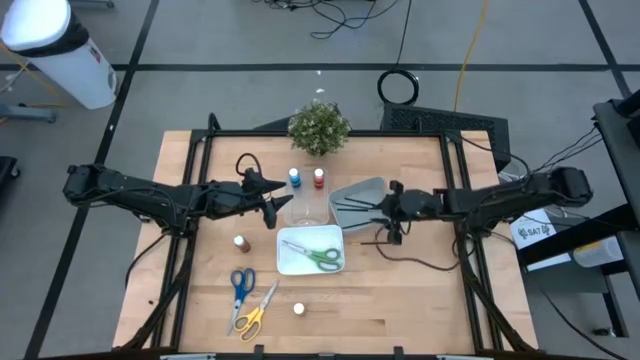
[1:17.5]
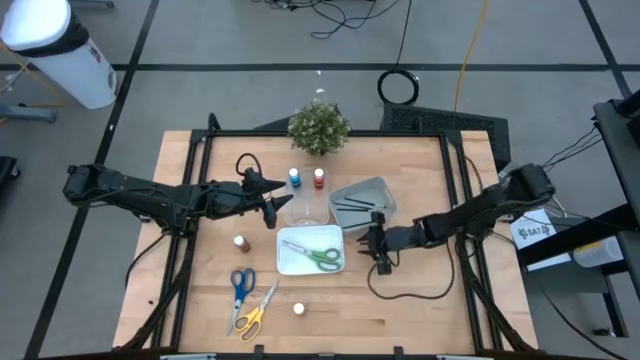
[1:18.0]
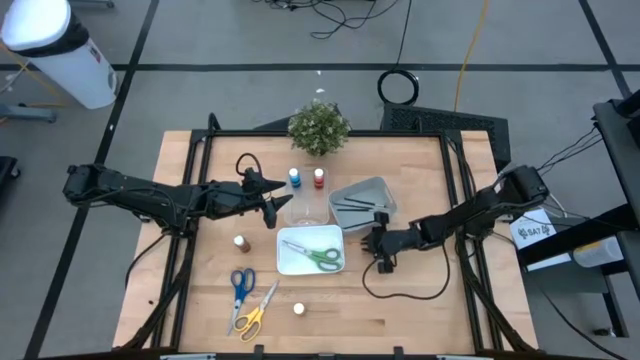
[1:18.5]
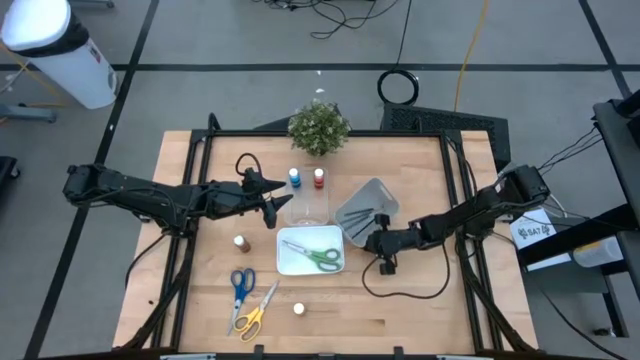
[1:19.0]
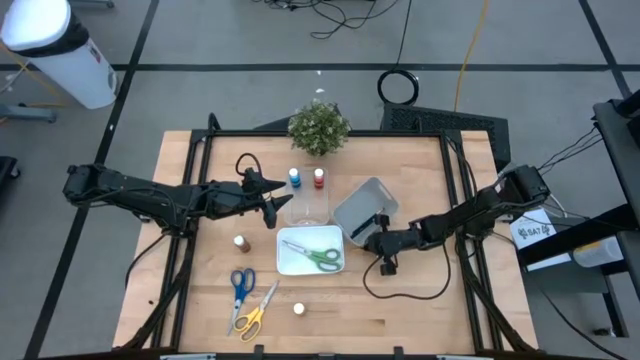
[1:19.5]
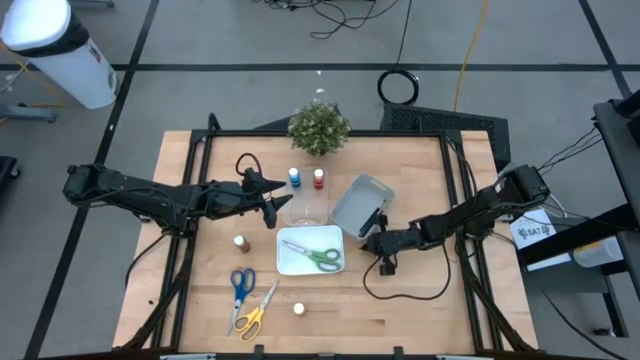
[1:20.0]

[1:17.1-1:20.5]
Task: Pick & Place Paint Supplies
Put the gold paintbrush into the gray bin

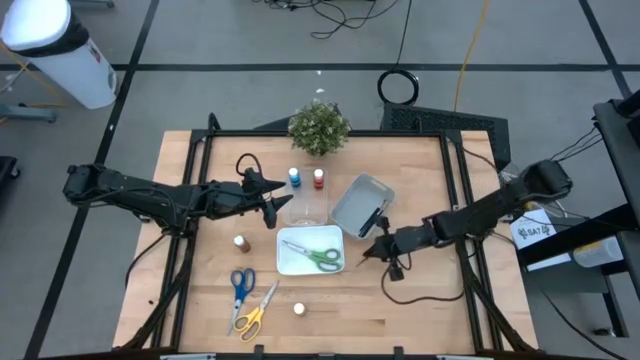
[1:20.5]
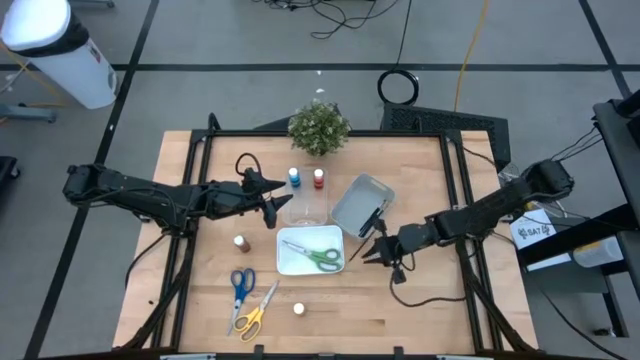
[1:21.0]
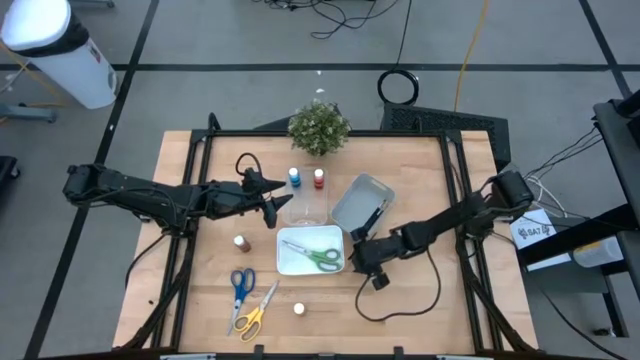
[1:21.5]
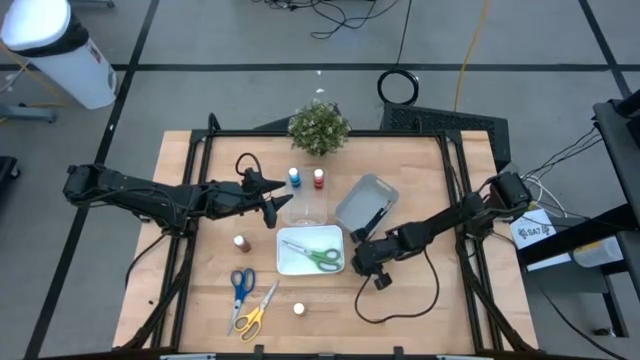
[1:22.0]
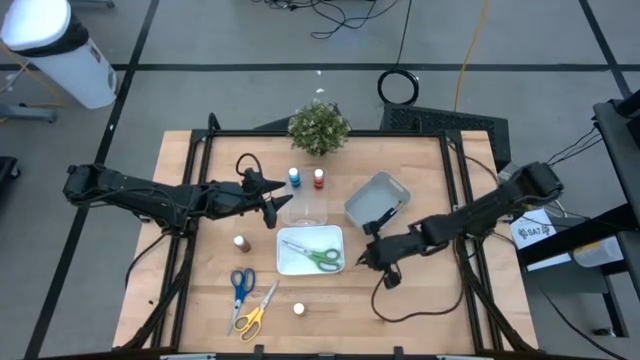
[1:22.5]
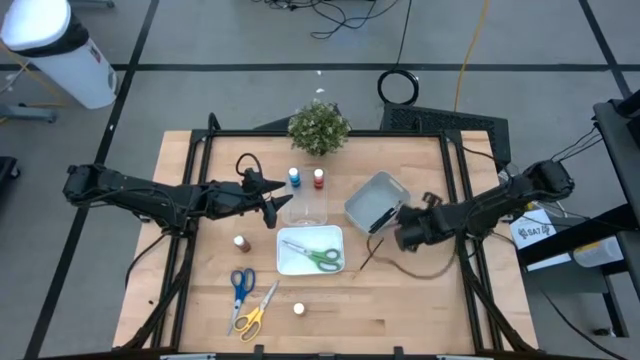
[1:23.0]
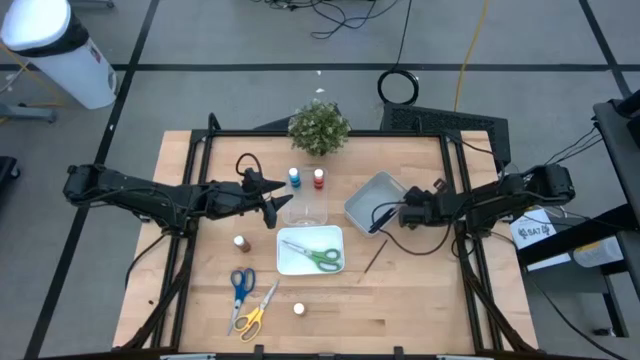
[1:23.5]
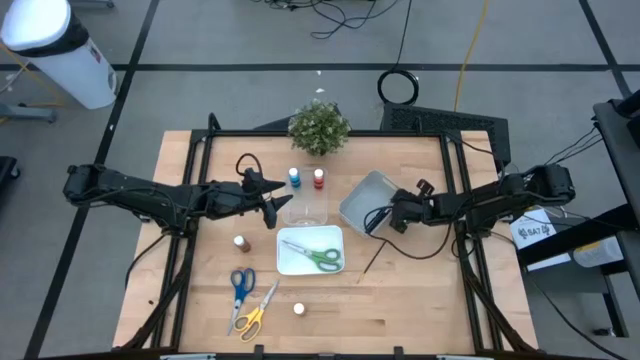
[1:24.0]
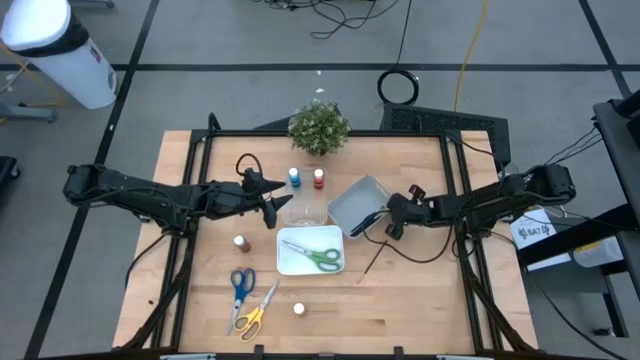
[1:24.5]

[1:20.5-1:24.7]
Adjust the gray bin

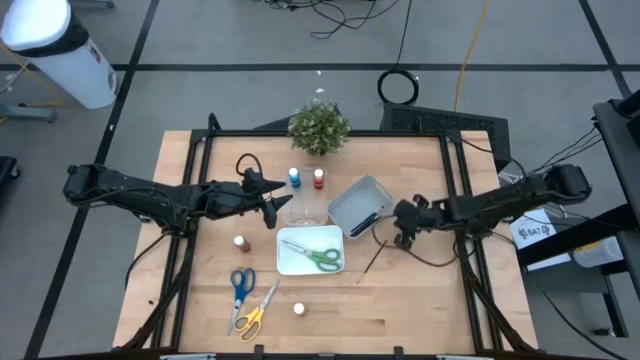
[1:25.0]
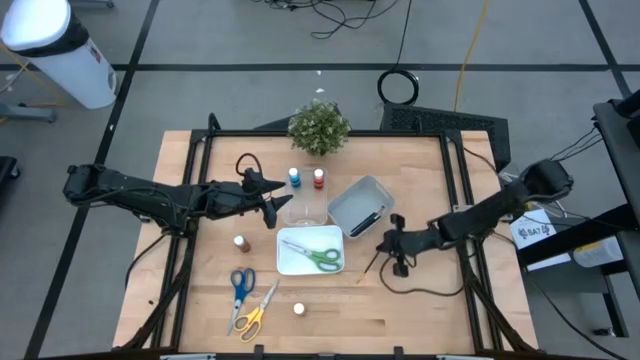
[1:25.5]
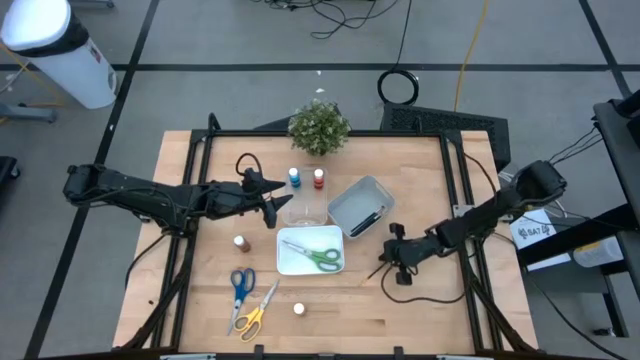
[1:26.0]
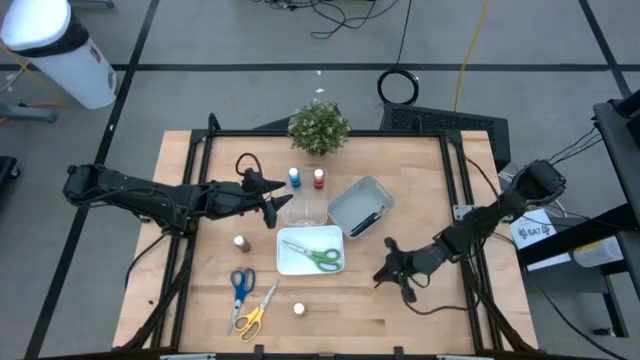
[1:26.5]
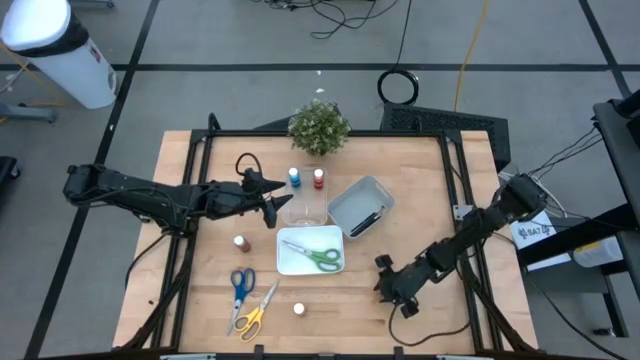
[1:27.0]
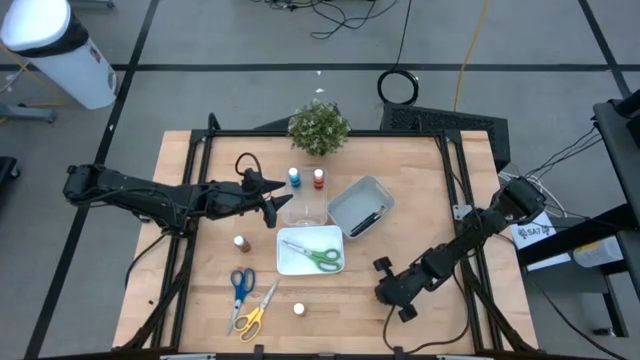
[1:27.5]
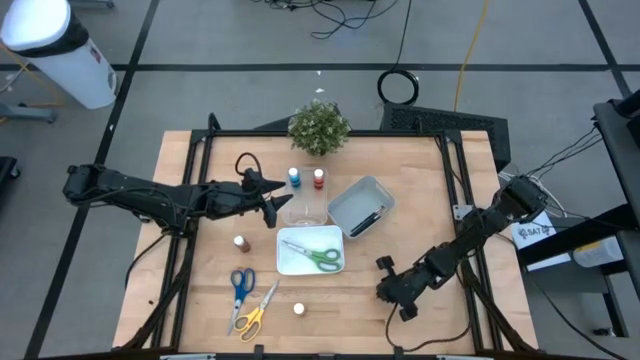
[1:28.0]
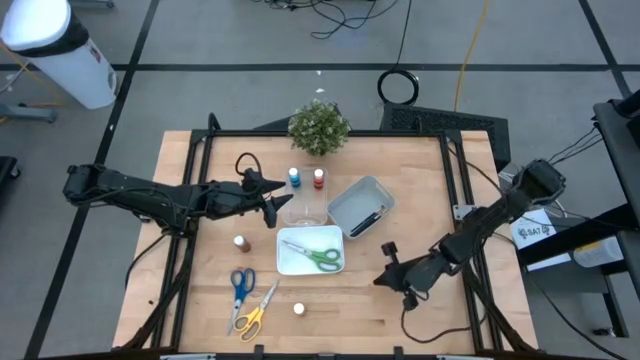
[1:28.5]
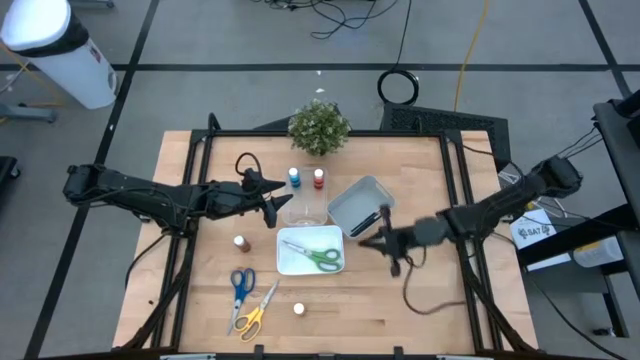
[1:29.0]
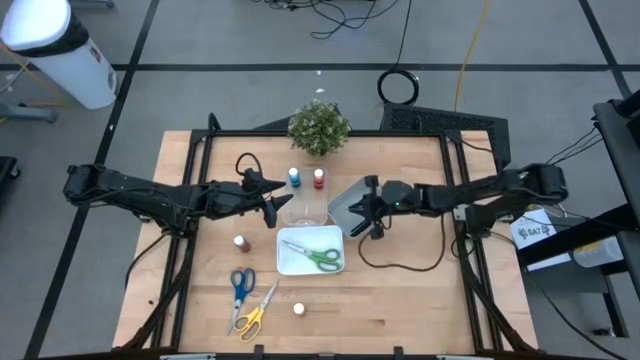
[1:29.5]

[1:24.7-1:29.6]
Put the gold paintbrush into the gray bin

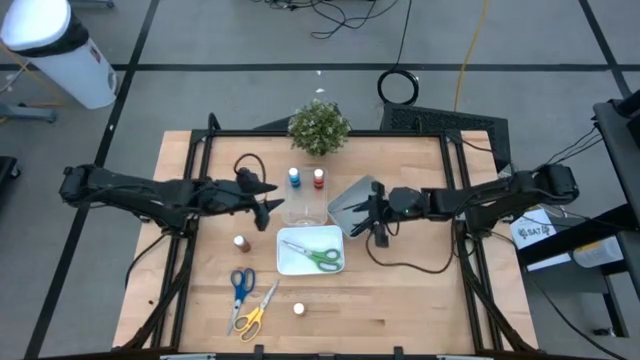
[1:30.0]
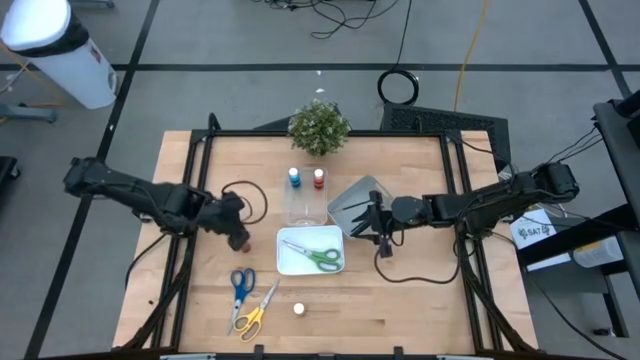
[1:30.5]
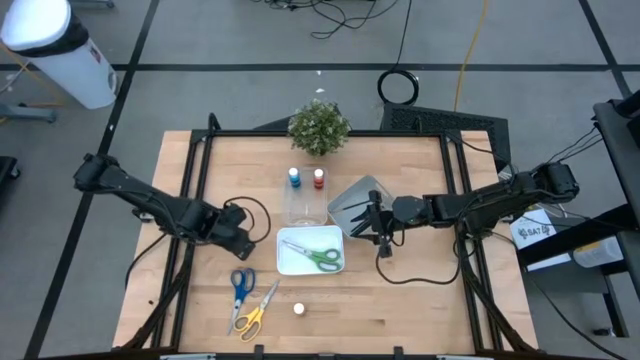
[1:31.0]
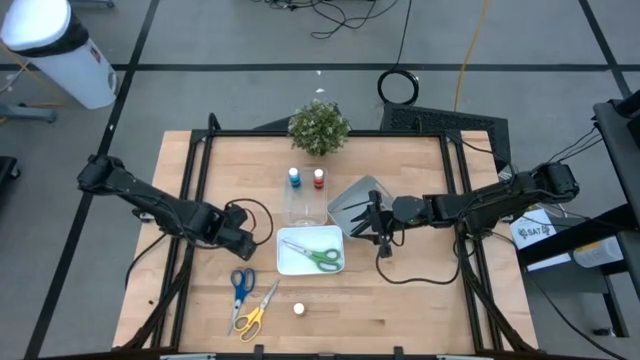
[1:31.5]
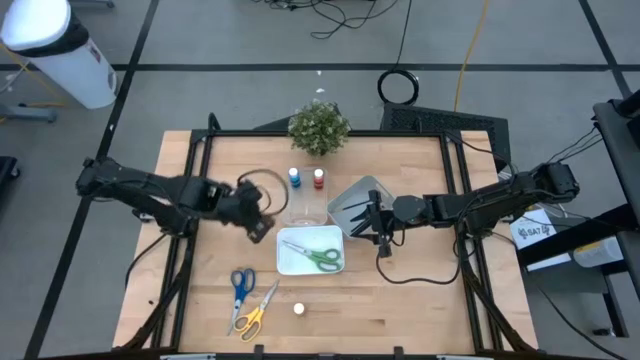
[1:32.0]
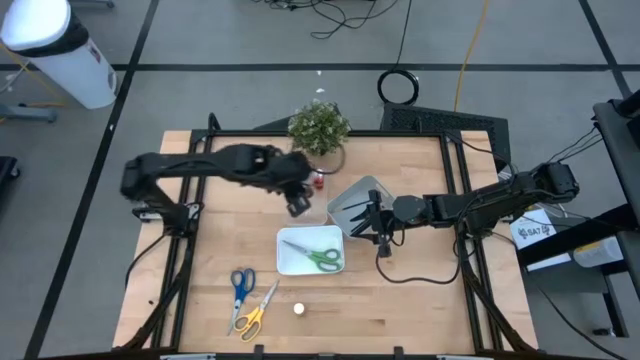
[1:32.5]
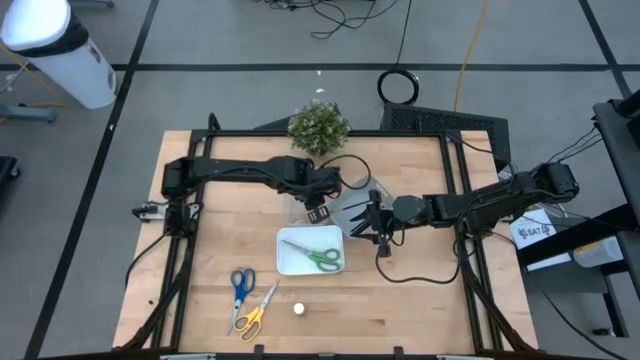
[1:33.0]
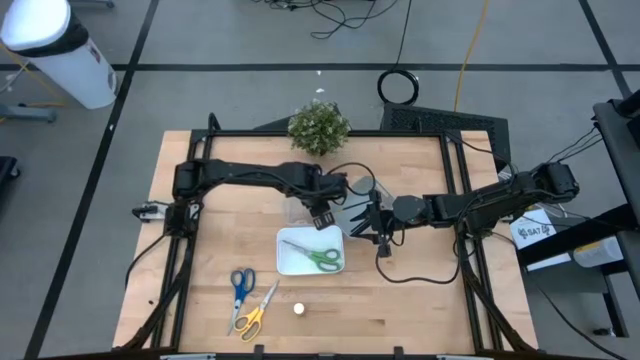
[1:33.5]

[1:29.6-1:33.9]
Put the brown paint bottle into the transparent bin

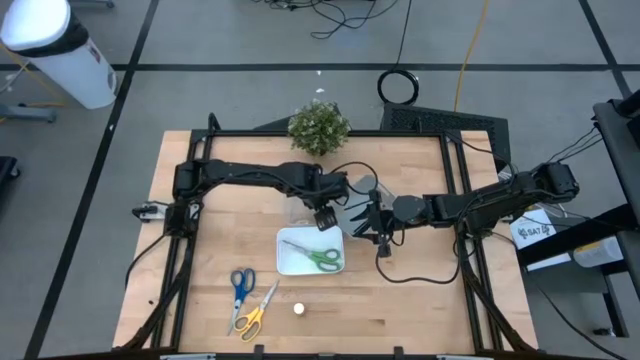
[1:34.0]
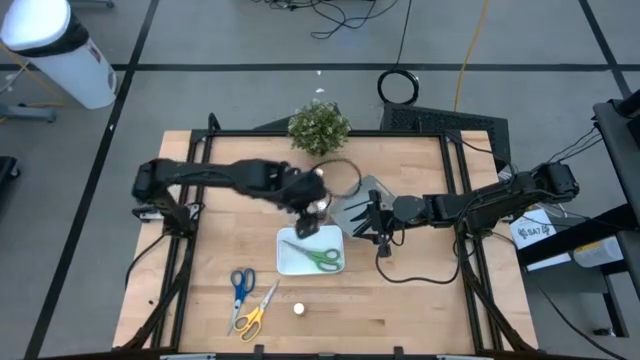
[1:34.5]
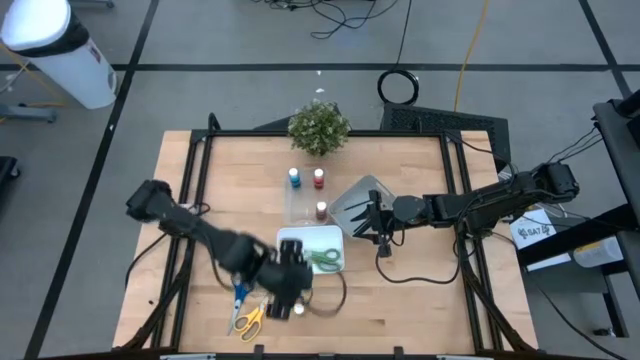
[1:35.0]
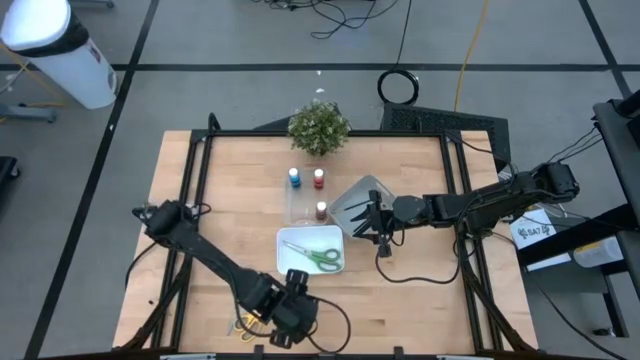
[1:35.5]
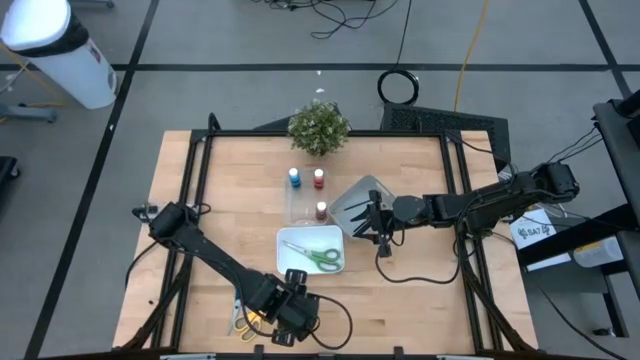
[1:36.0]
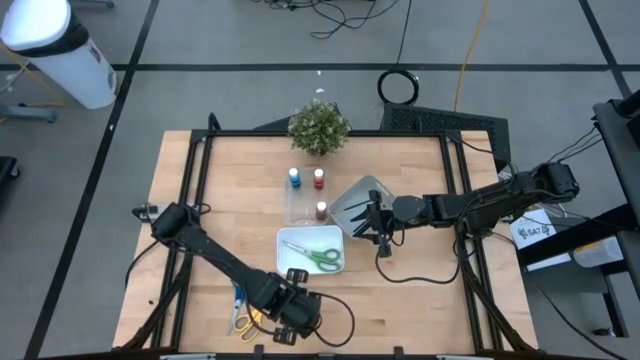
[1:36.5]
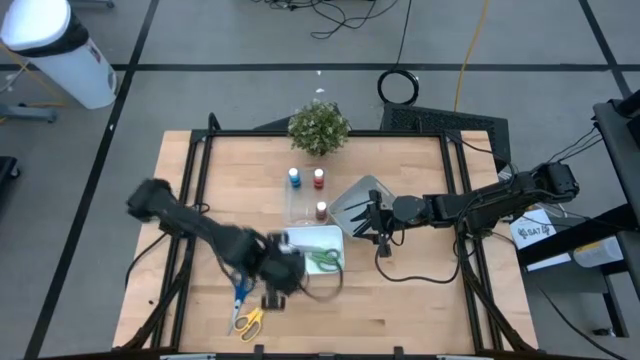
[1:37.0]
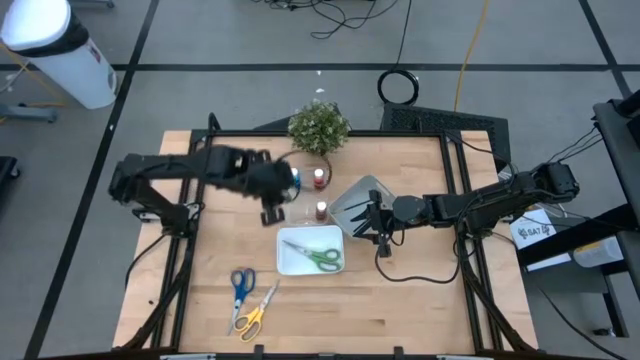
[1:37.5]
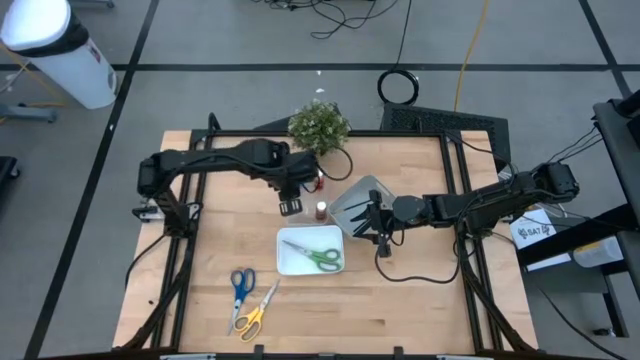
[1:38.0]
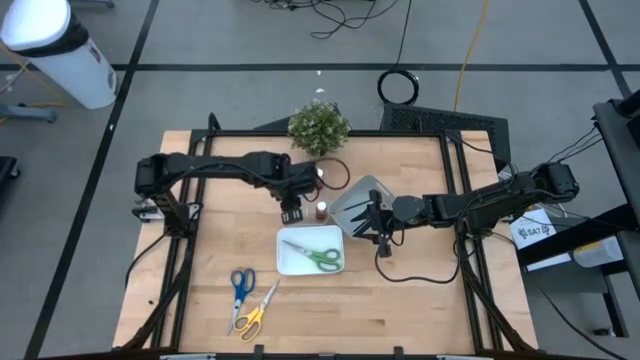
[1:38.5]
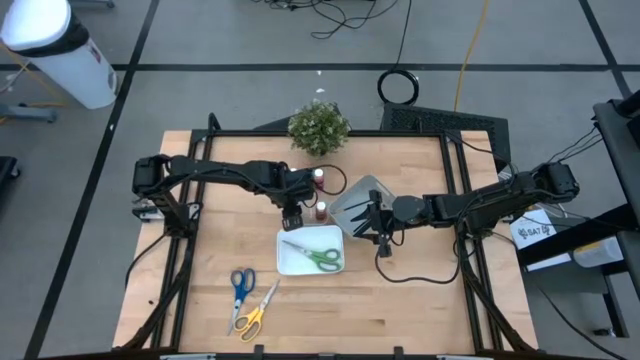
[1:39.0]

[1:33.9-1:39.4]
Put the yellow paint bottle into the transparent bin
